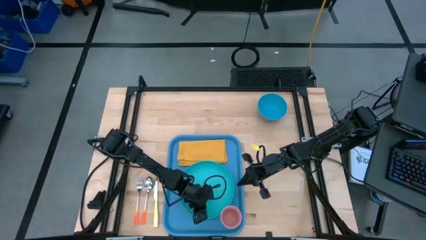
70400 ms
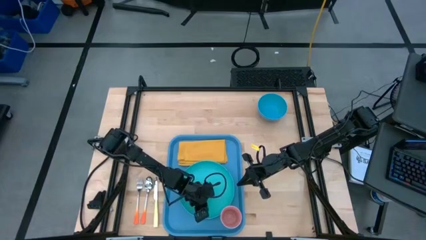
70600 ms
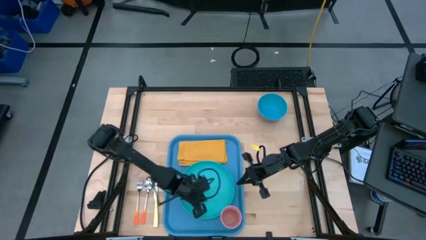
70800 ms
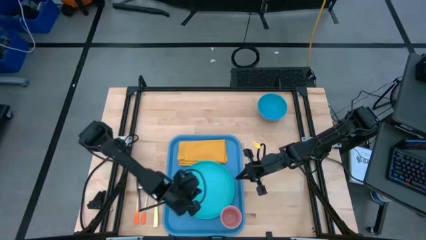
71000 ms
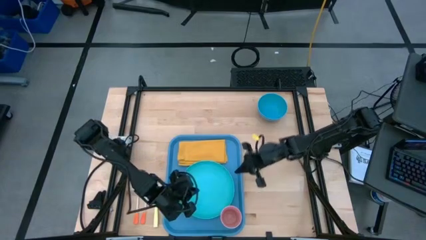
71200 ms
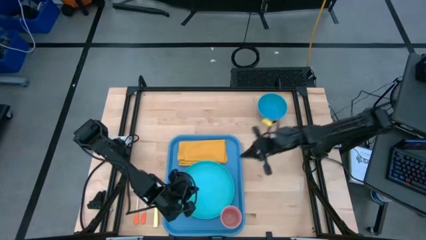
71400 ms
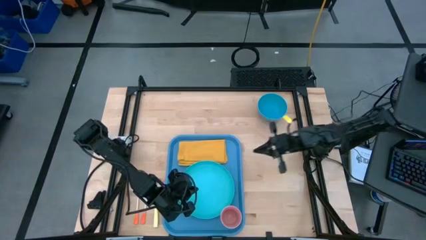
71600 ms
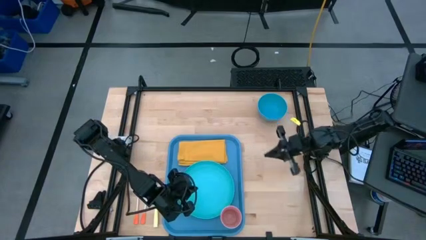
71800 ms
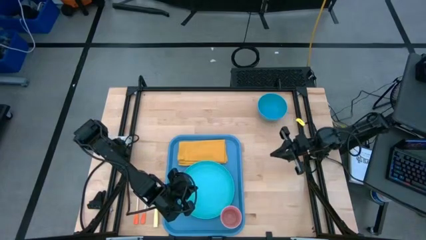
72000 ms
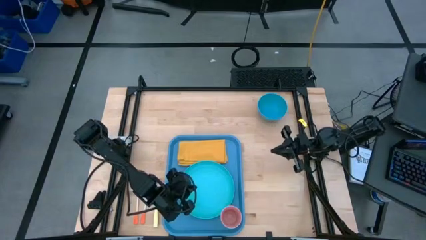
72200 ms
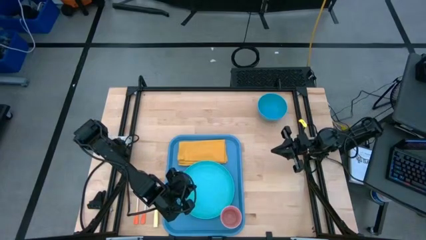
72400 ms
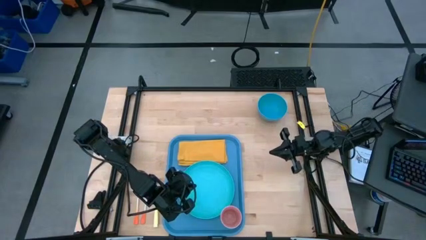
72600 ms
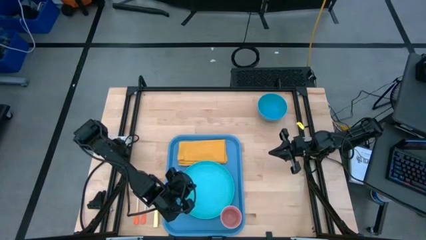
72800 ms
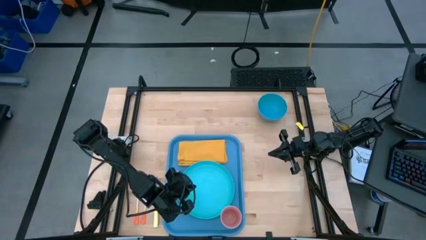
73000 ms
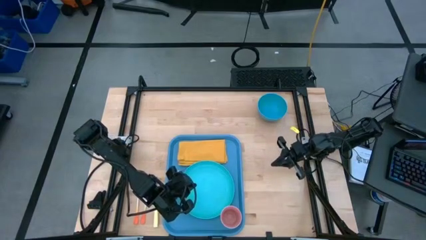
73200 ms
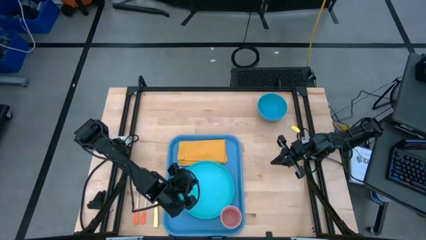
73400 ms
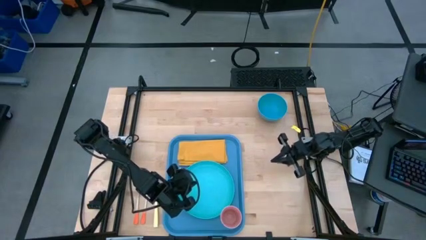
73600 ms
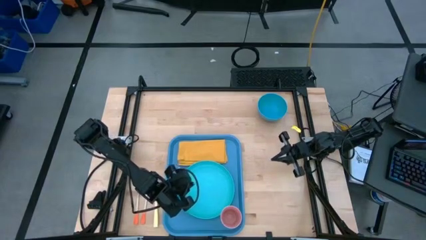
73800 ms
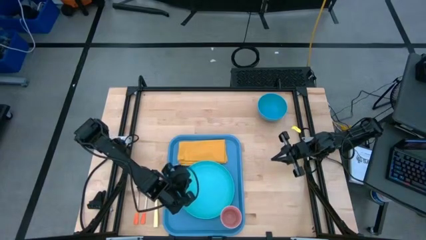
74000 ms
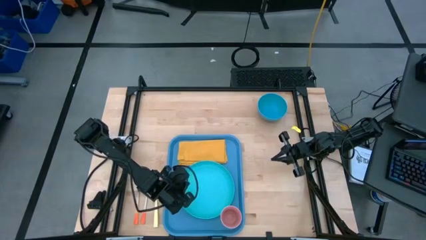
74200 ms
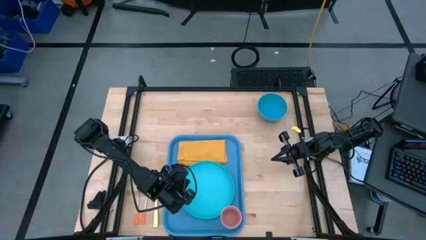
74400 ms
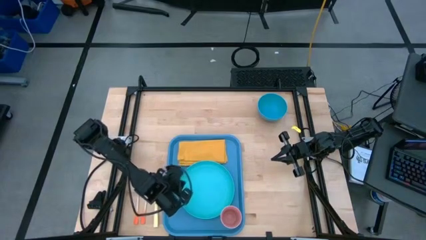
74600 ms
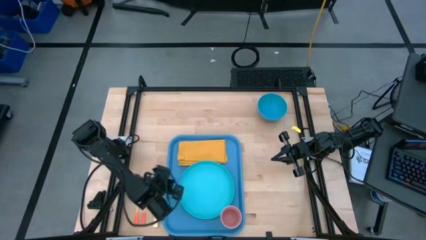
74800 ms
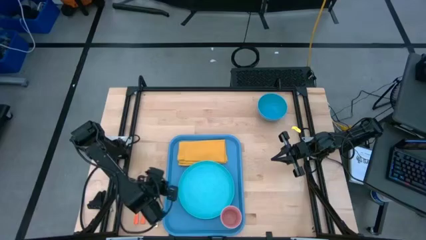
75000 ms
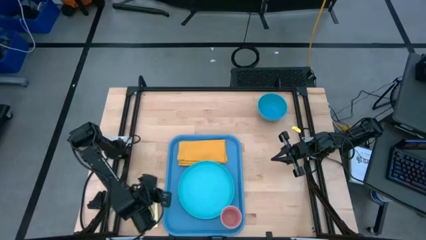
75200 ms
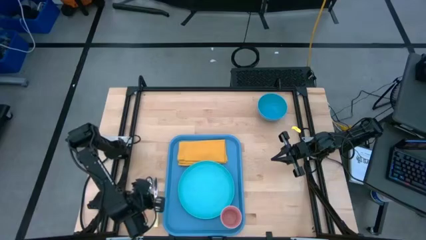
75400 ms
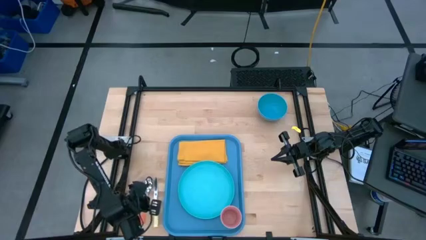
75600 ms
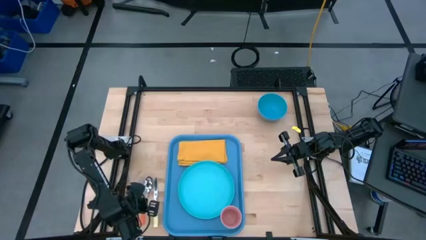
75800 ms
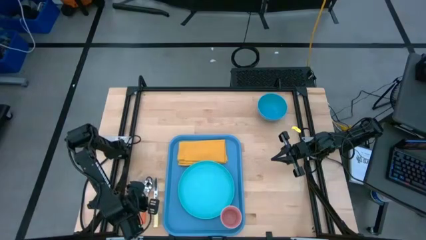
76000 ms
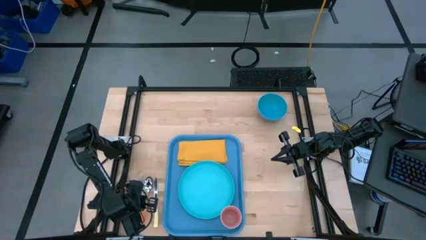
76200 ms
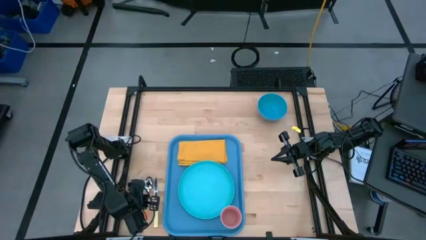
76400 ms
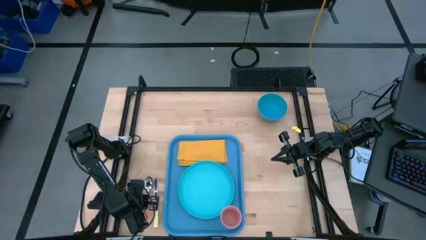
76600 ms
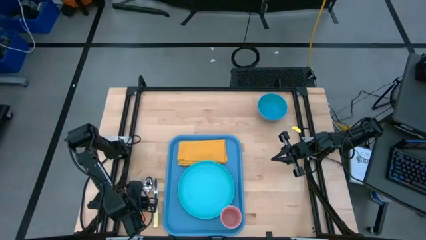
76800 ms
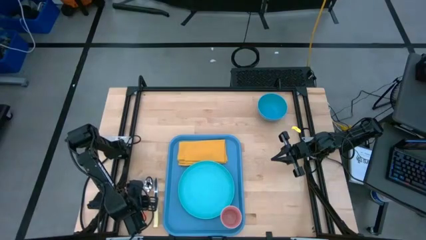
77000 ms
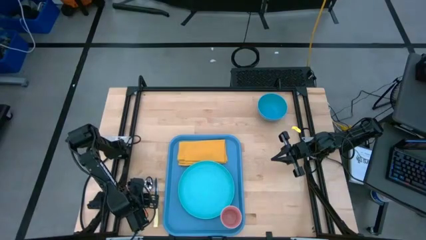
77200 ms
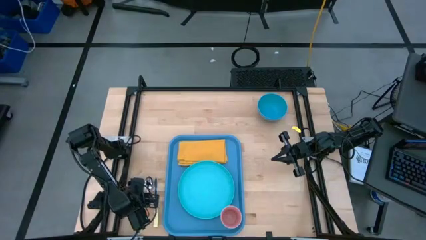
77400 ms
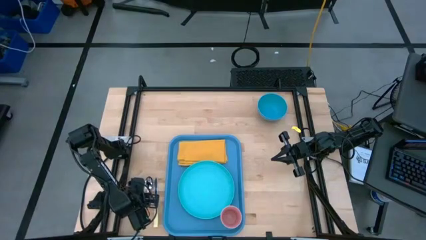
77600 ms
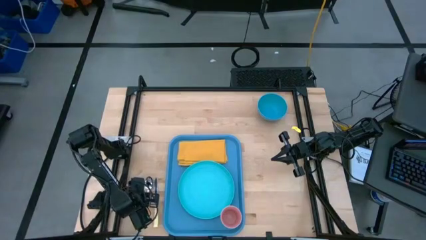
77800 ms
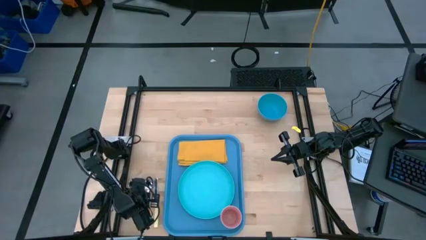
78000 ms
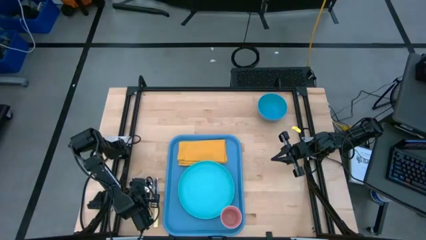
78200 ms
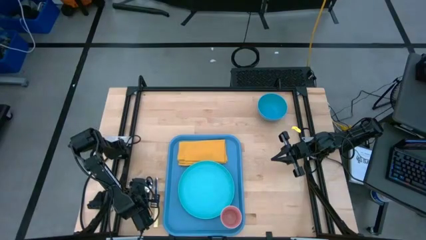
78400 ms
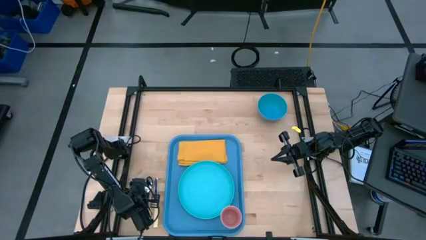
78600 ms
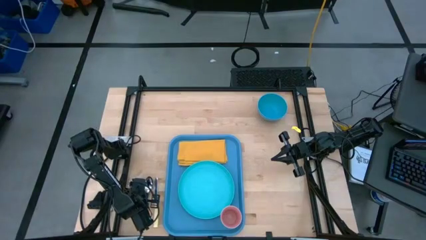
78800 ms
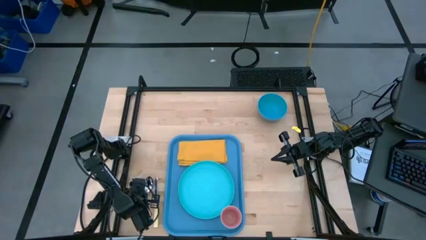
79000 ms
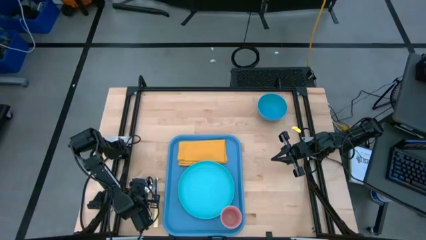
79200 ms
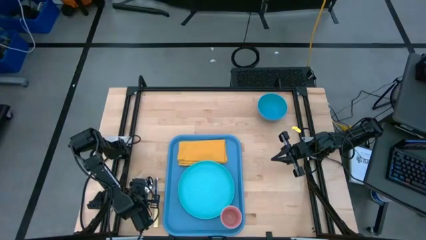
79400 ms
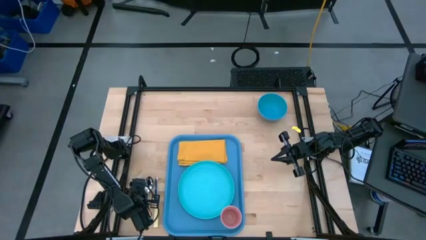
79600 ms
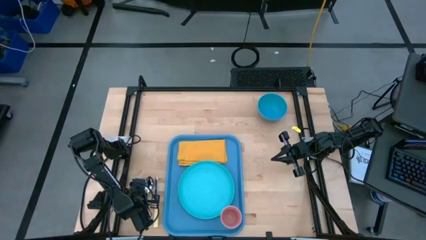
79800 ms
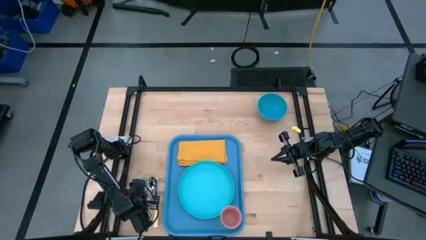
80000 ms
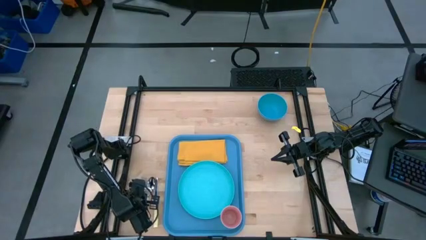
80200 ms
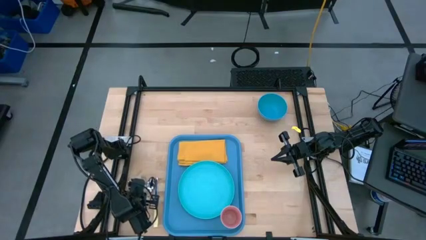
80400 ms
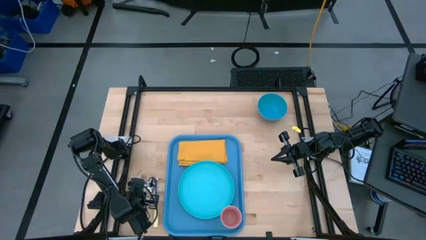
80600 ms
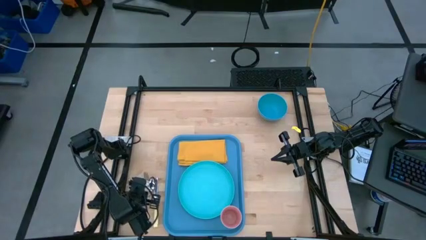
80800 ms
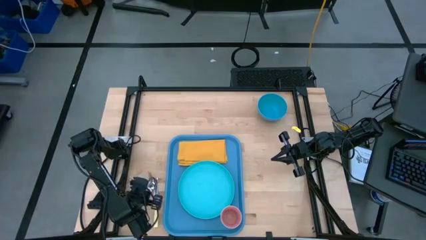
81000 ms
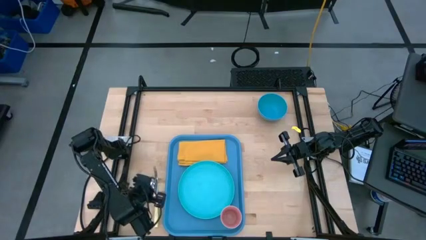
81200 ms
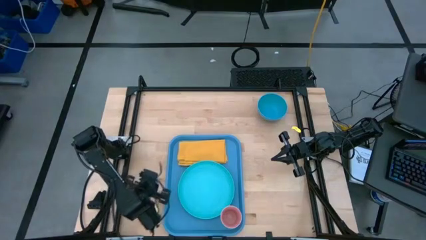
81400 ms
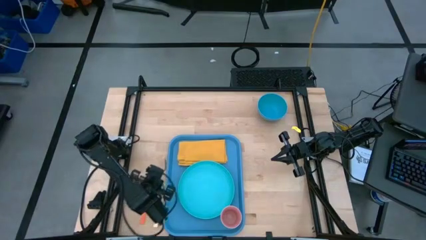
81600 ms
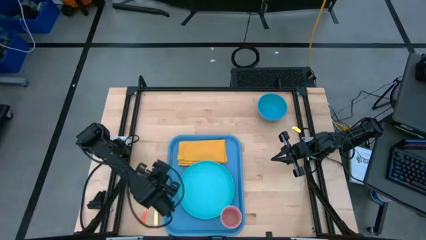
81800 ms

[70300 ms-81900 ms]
Task: Set up tray
Put the orange fork to the left on the yellow napkin on the blue serving tray

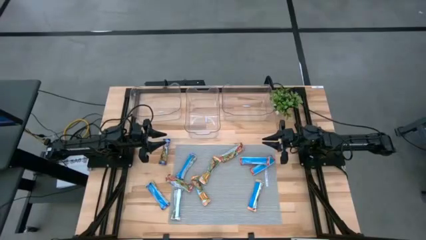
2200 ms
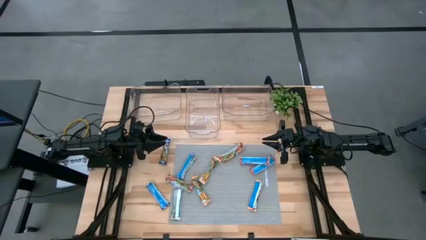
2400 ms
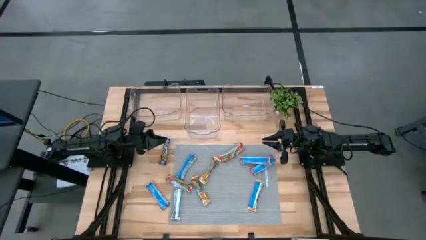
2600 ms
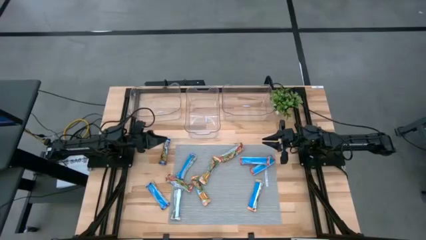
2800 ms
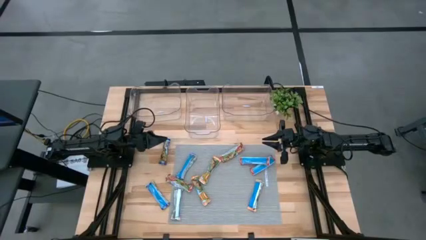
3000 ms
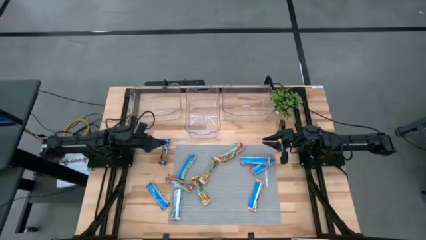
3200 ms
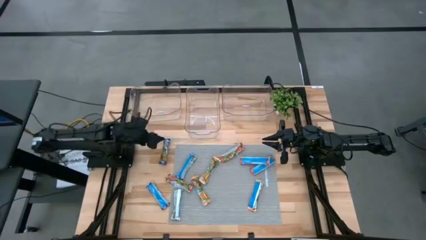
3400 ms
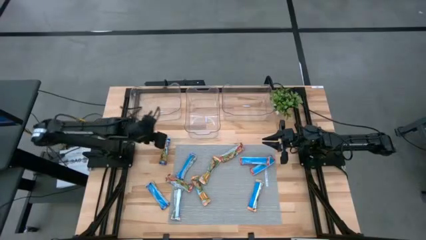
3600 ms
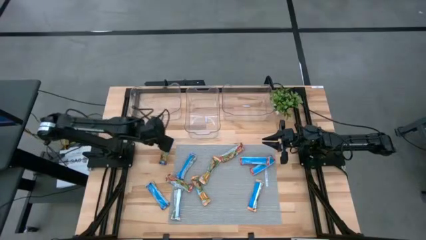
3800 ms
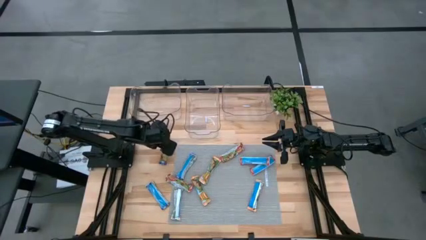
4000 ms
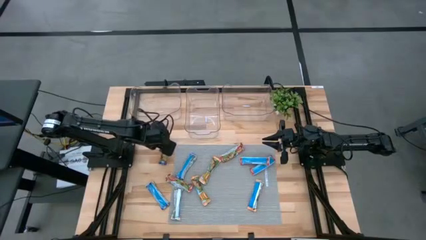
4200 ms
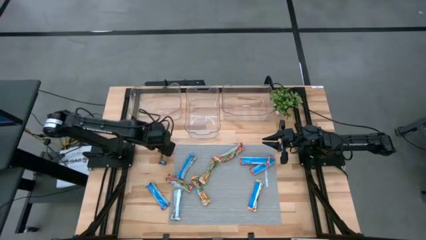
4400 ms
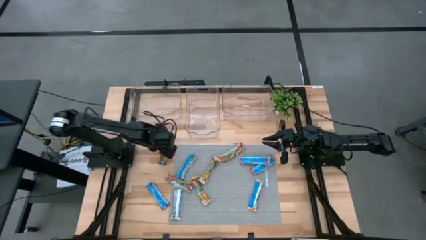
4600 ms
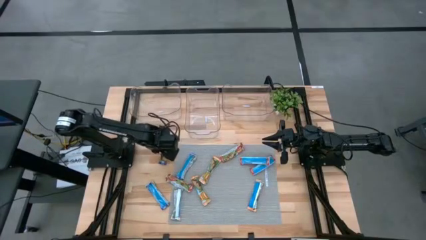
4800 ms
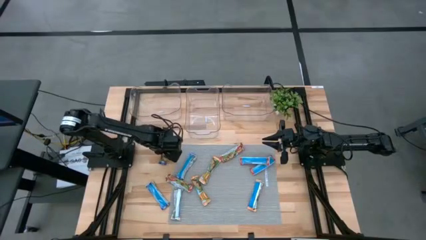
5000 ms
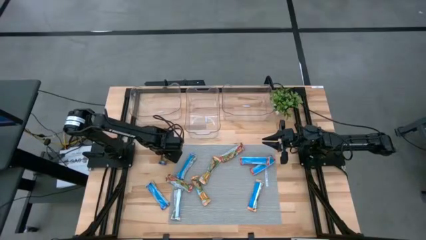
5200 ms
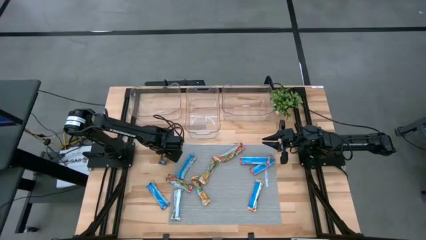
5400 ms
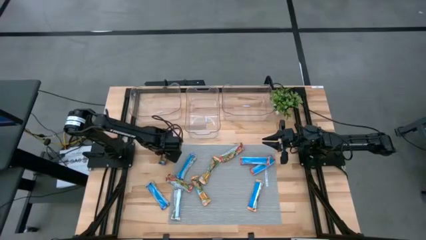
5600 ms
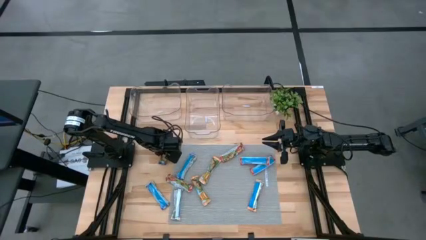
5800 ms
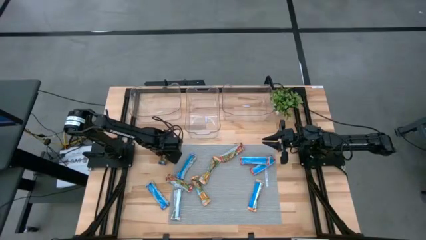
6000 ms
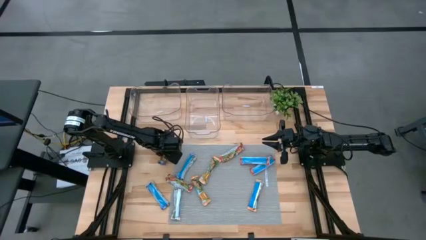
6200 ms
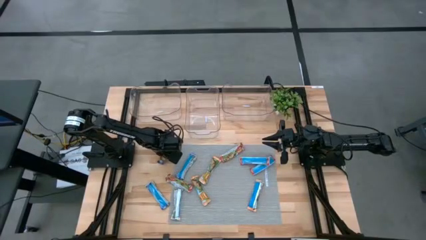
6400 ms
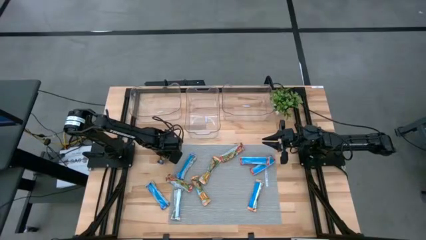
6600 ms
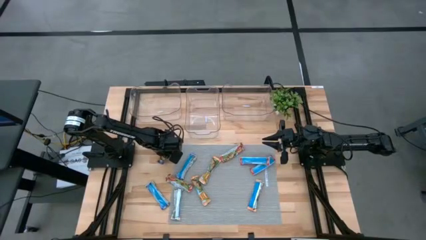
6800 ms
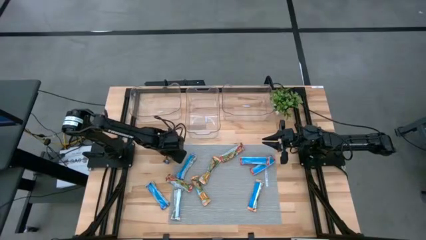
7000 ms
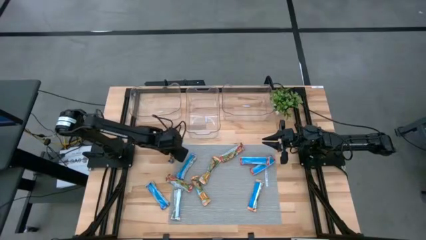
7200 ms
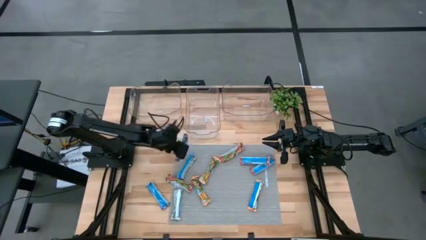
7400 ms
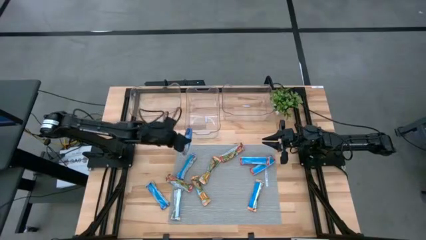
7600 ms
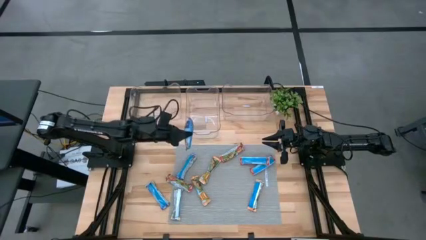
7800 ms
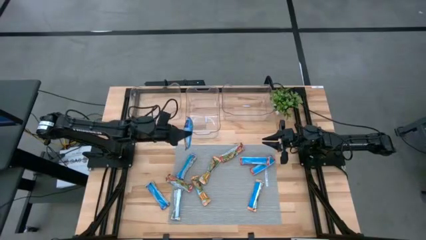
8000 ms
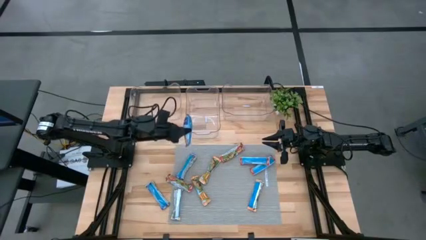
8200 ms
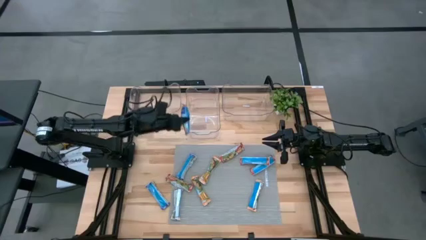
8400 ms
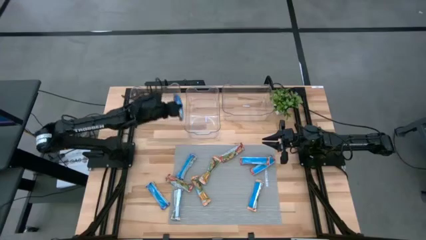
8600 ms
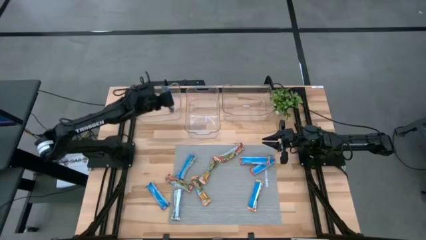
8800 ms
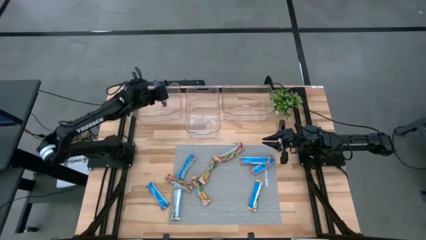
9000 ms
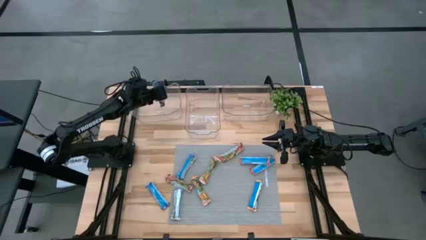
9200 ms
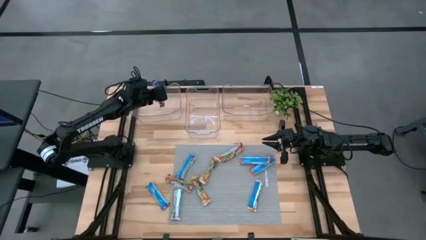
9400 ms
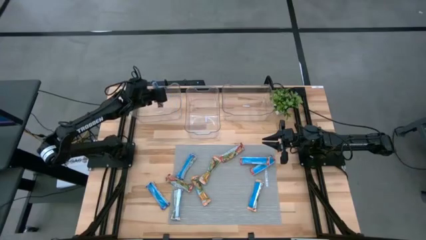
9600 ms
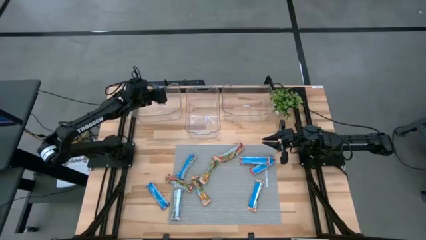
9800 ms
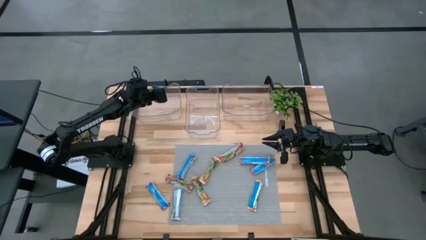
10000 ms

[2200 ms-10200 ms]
Task: Pick and place Granola Bars by type
Put the blue granola bar into the left transparent bin
